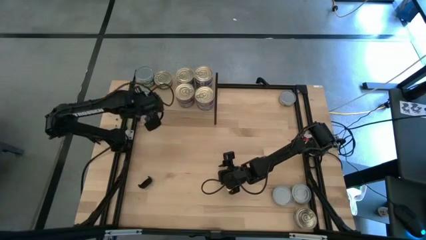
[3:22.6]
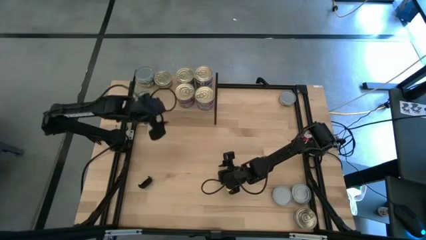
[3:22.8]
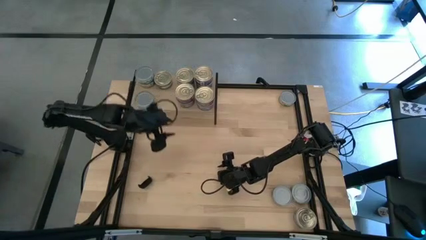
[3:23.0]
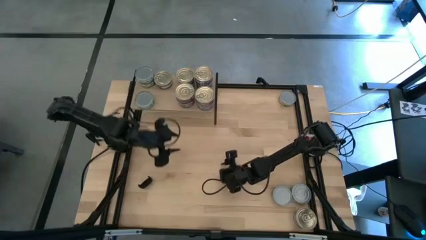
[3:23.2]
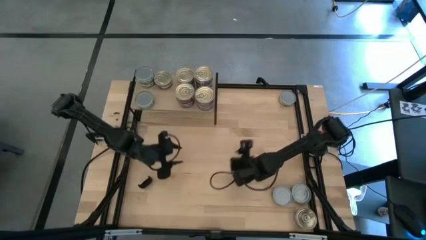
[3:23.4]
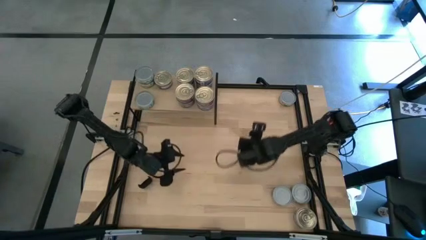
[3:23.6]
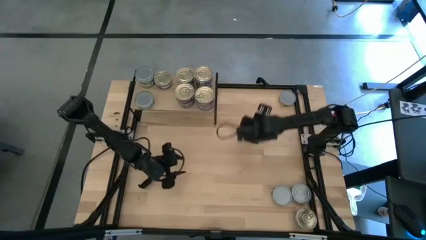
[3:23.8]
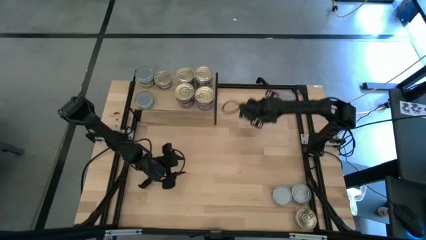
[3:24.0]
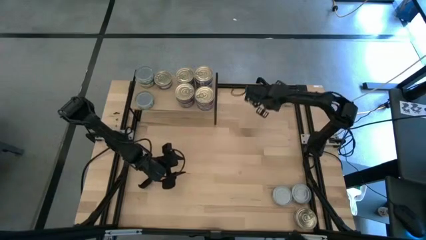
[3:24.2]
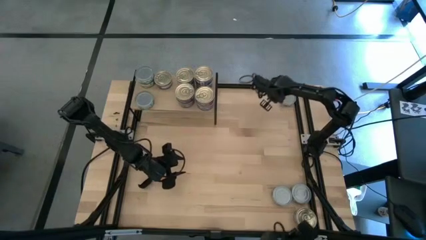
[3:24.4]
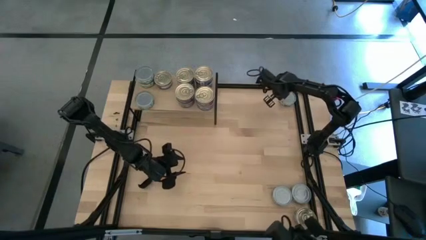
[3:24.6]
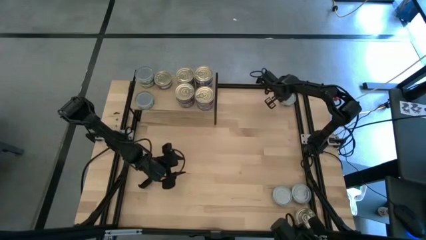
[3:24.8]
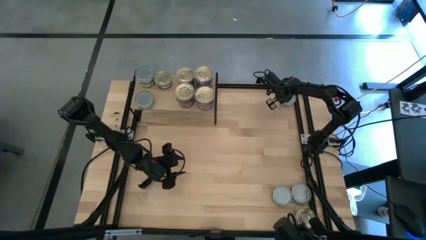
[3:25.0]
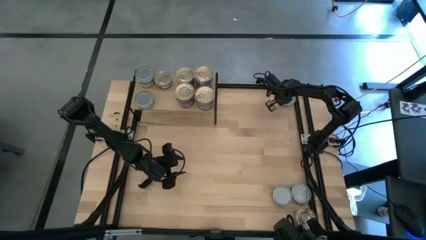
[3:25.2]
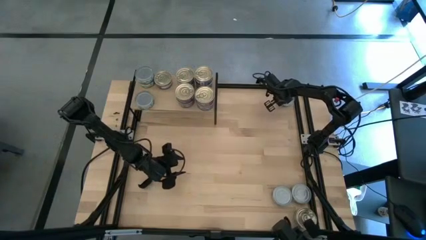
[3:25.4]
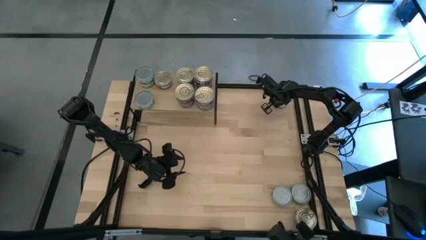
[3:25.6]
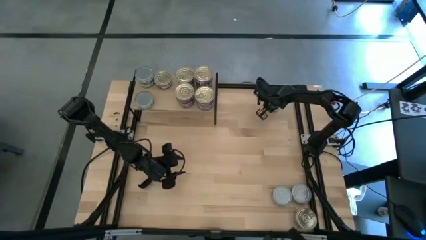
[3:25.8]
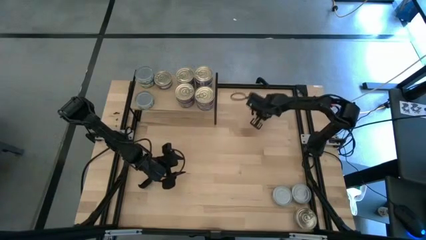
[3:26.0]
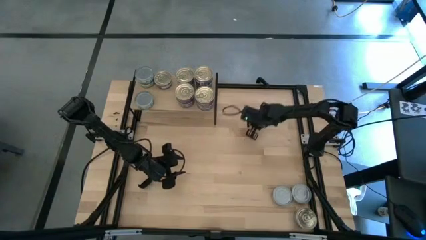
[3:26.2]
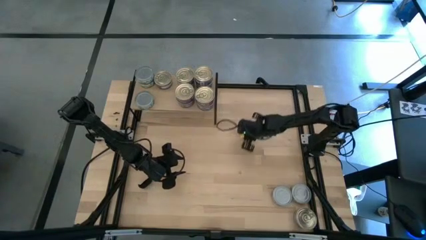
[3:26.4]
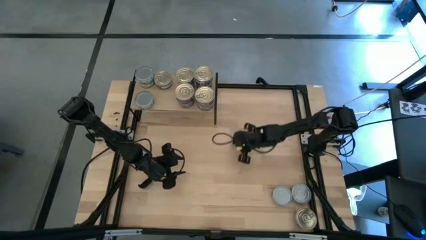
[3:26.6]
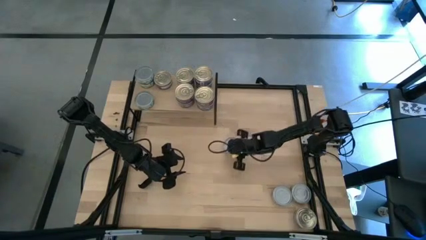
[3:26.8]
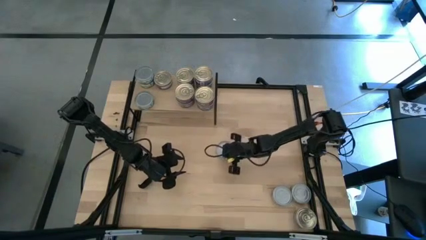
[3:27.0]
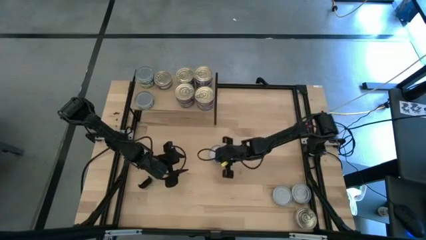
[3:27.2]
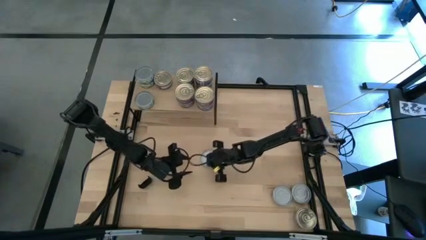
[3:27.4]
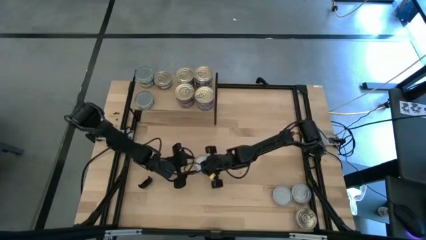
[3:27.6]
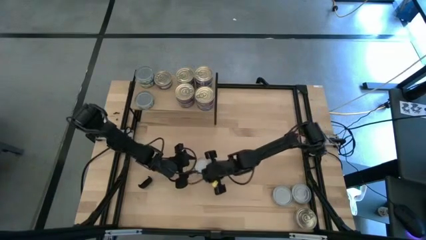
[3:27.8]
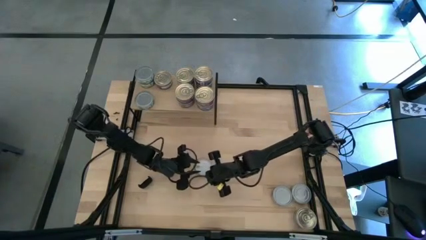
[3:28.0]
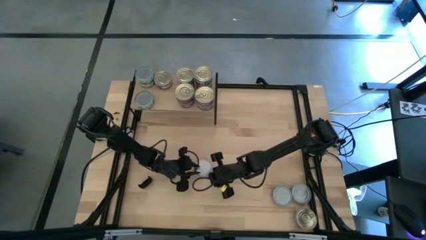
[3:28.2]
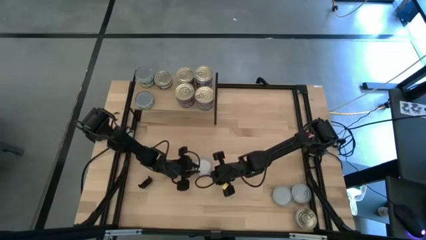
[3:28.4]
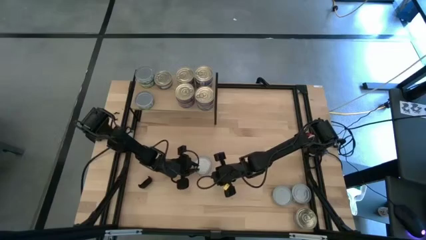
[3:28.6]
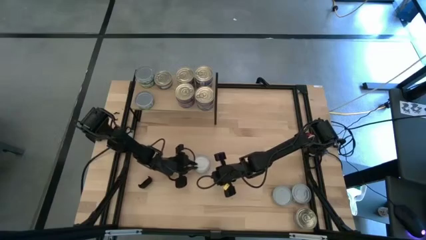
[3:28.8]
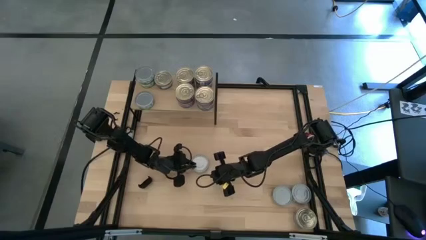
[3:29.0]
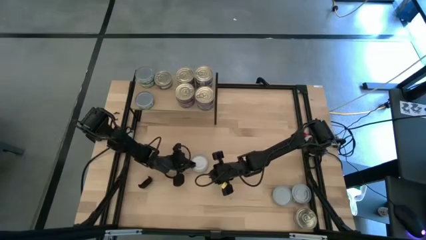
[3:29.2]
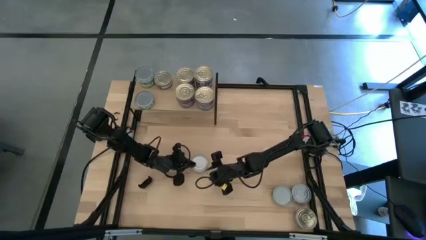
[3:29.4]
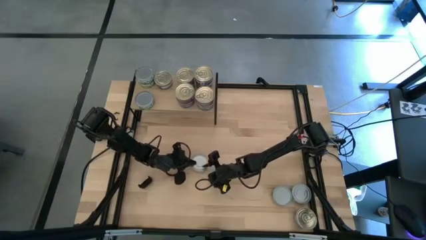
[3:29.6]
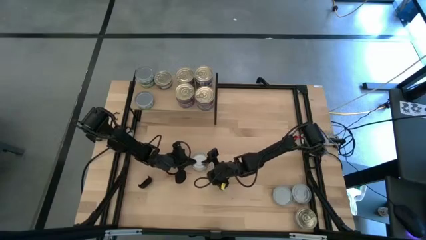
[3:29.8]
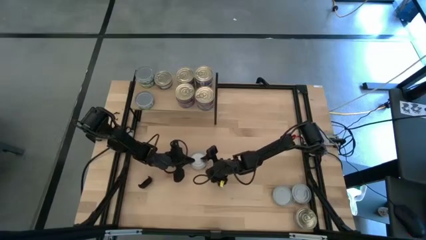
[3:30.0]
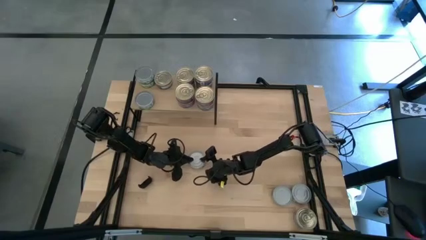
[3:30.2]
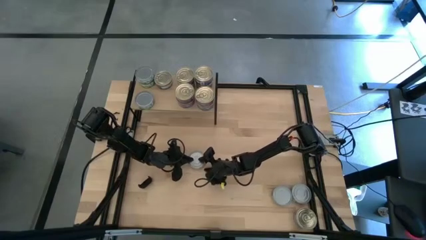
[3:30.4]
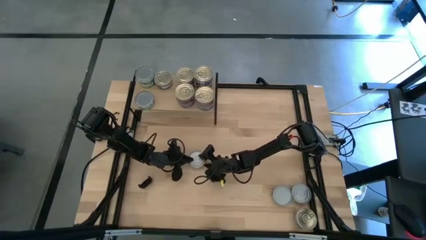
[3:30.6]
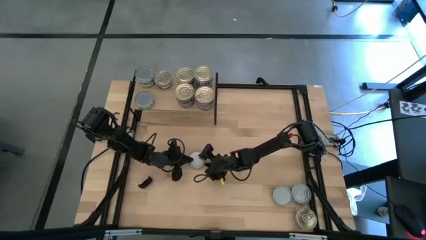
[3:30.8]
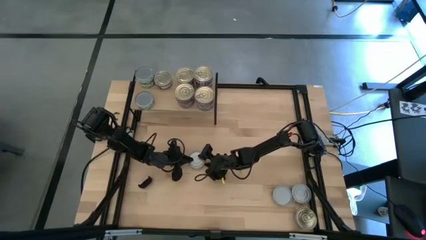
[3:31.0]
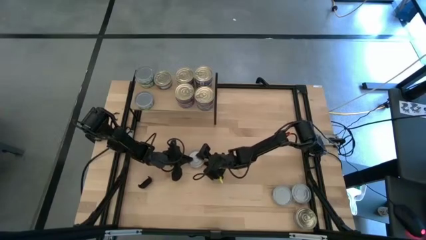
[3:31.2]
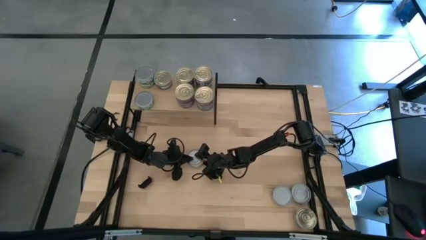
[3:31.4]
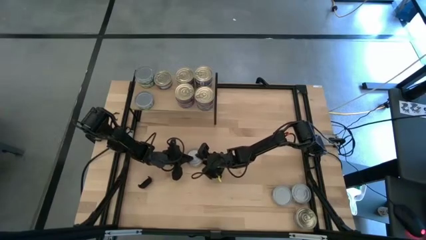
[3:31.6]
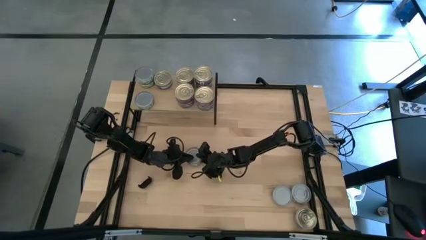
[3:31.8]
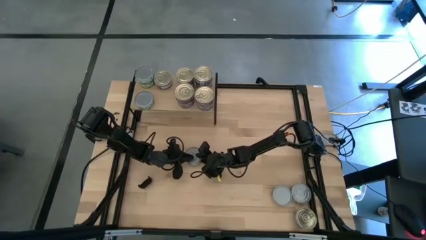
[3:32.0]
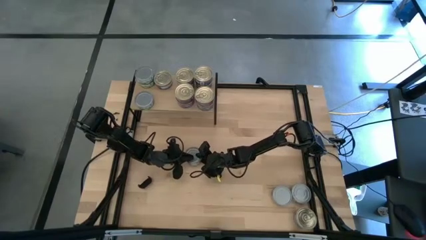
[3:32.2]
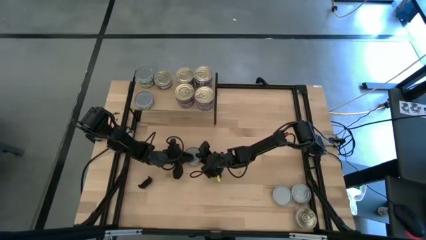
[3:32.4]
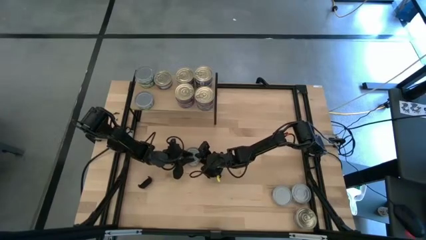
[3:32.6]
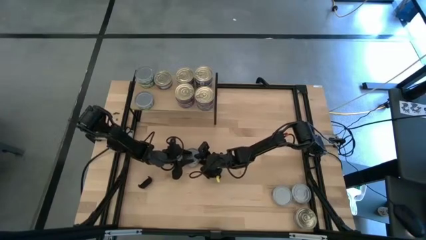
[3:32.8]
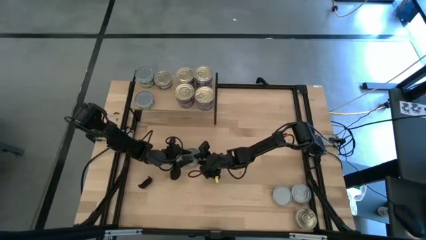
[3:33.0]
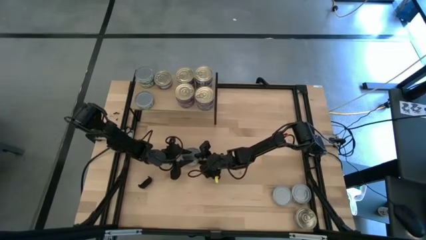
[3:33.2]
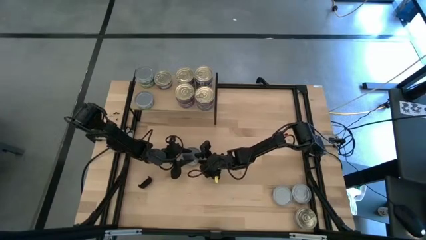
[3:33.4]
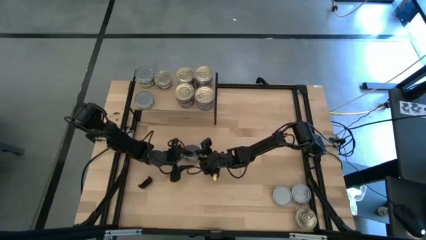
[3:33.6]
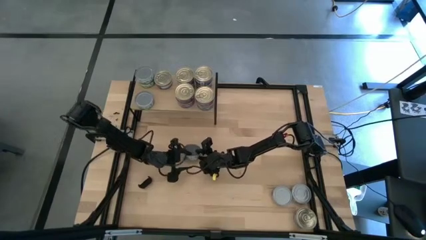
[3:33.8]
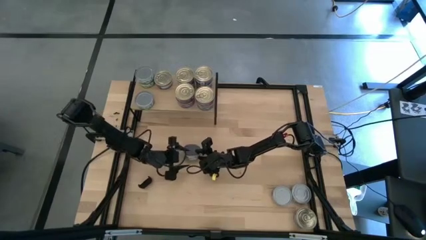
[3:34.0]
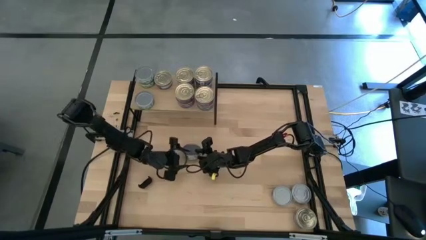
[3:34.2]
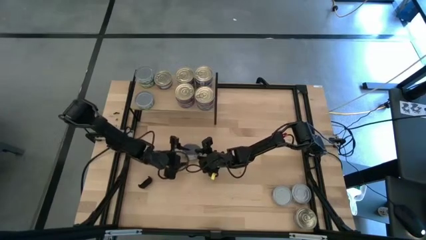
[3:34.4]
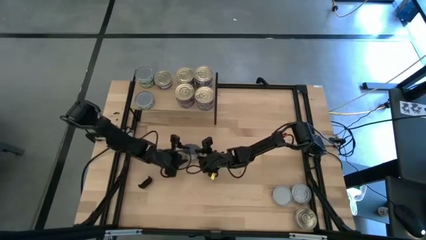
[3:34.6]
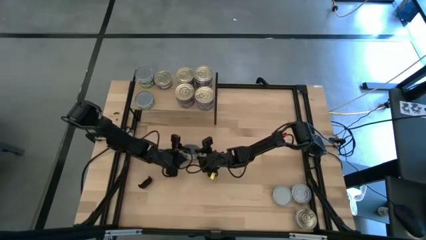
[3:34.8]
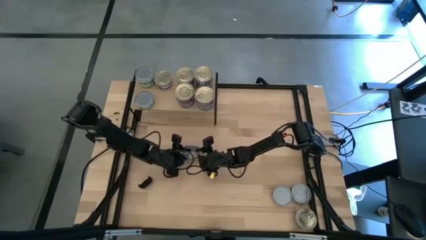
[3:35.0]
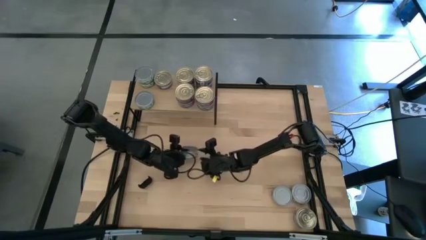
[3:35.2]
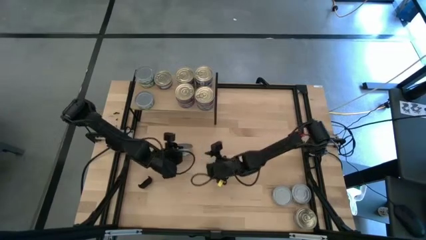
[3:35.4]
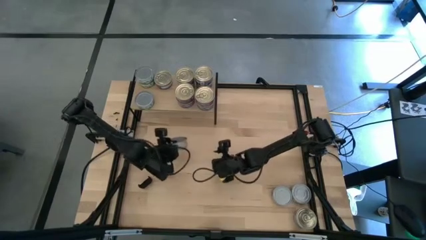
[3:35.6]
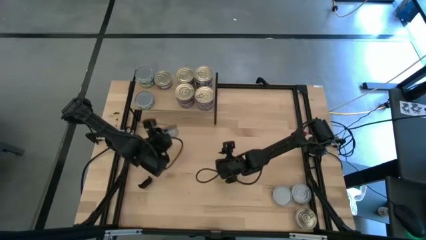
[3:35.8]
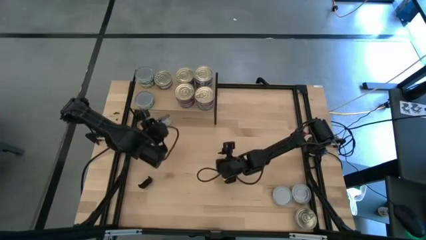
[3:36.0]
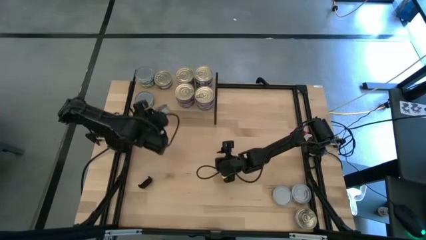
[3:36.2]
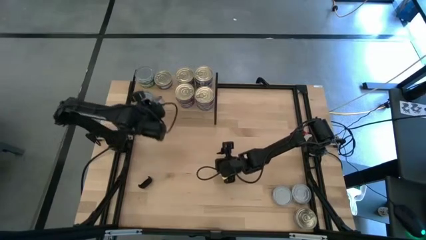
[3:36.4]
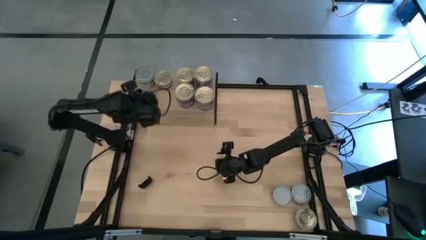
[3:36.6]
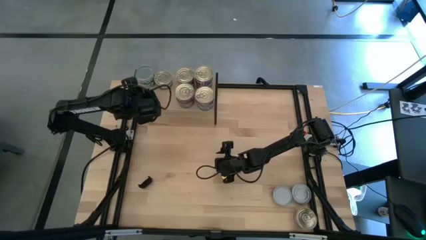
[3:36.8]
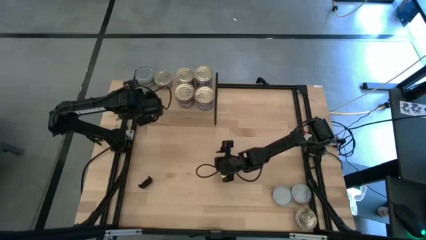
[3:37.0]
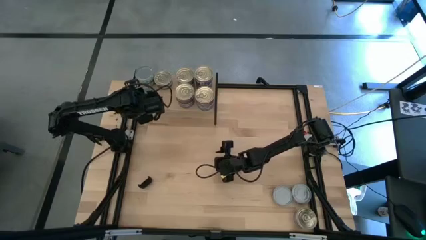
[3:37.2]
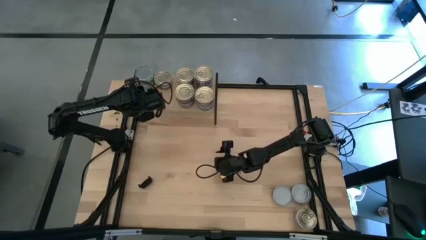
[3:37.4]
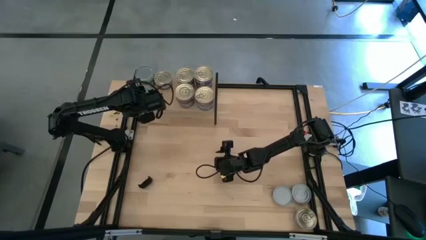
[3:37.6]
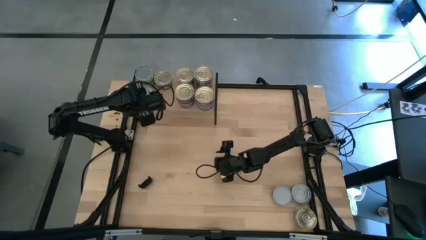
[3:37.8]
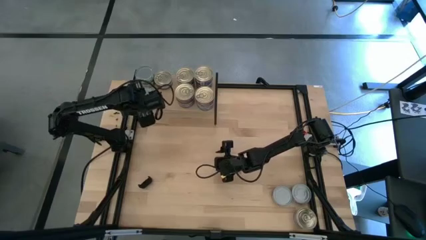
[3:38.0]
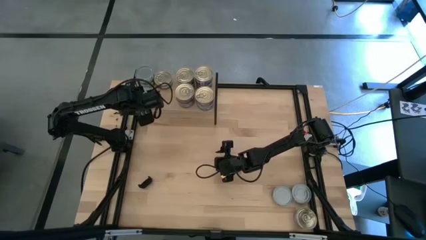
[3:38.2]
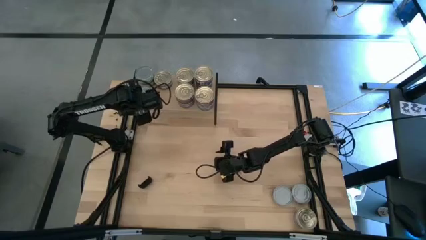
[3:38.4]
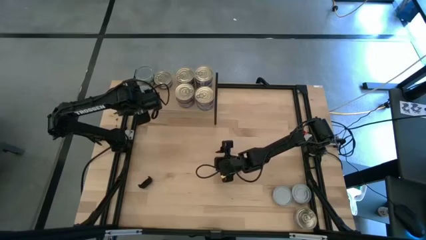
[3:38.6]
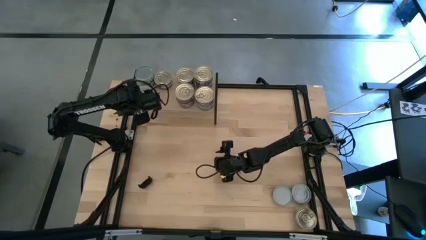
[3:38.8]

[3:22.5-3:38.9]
Task: Stack canned seafood by type on shelf
Stack the green tuna can on top of the green tuna can on the shelf
